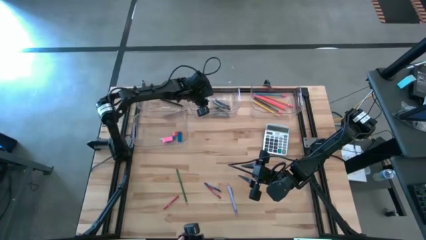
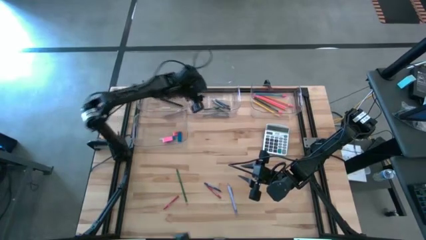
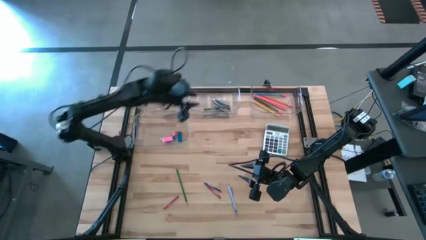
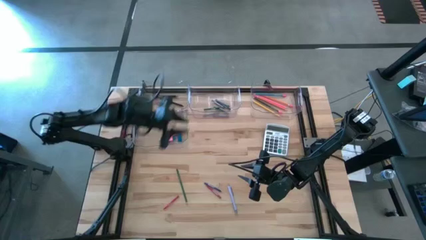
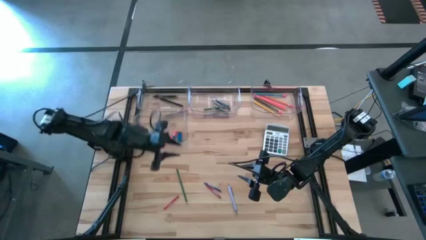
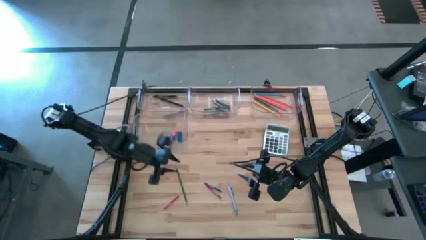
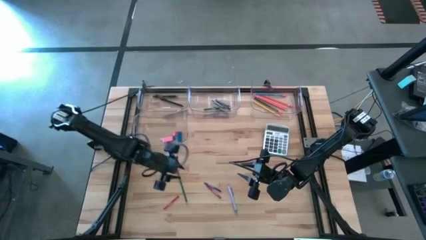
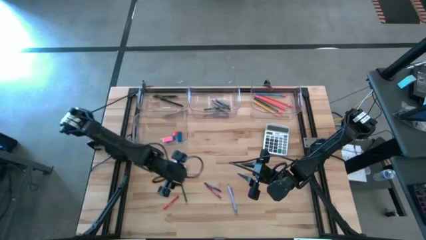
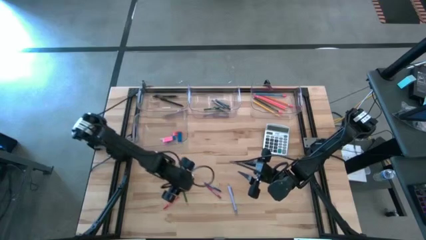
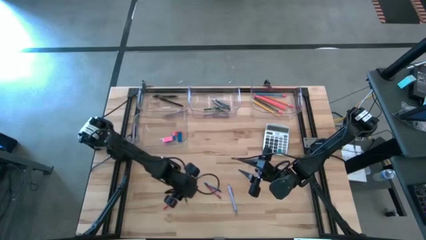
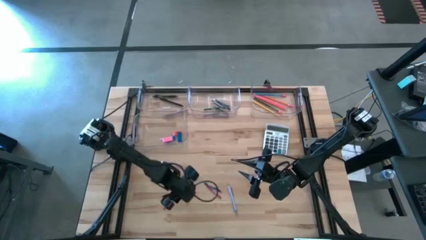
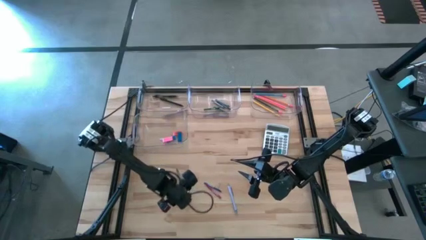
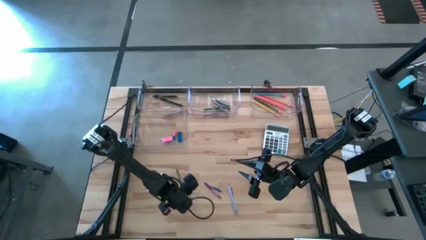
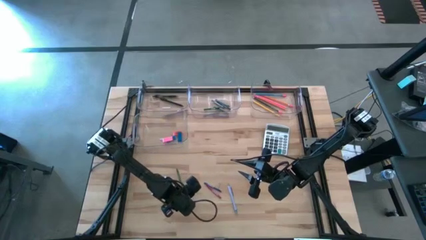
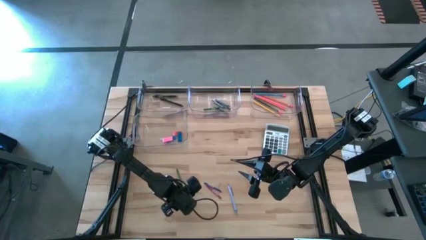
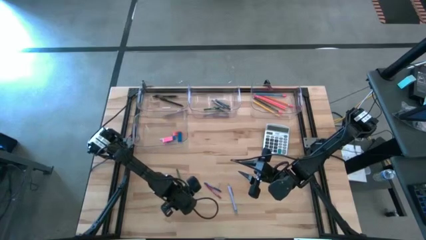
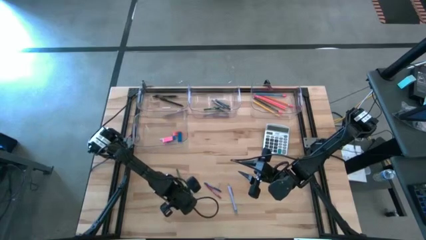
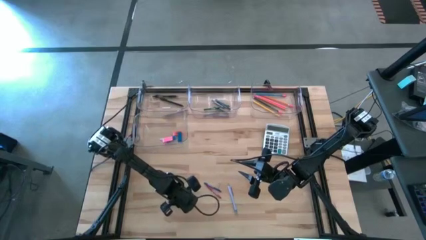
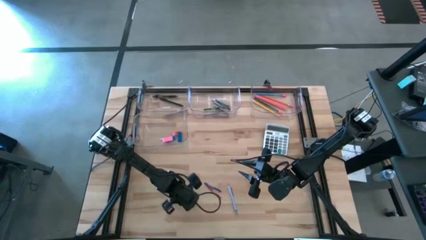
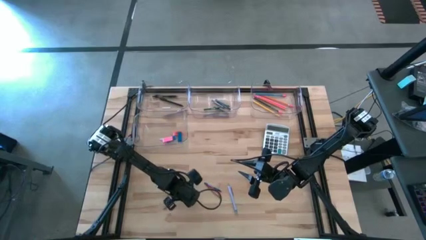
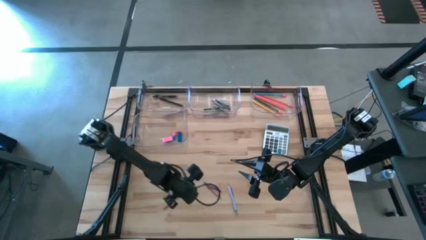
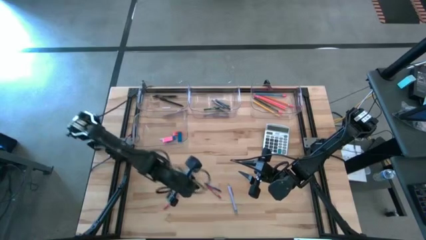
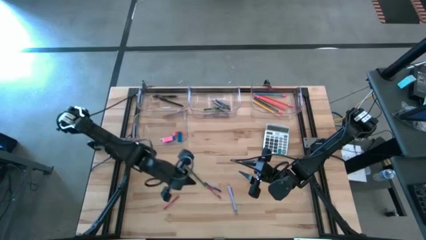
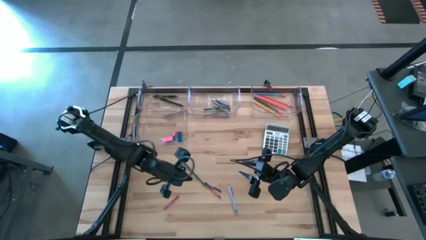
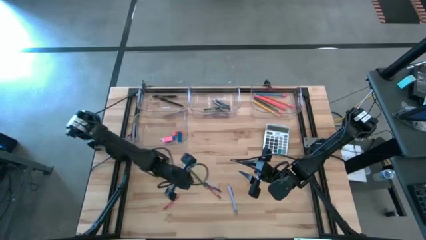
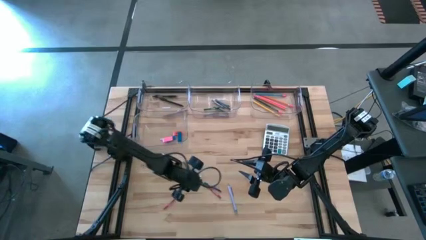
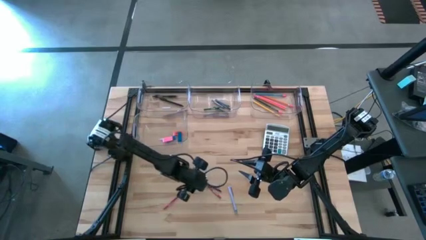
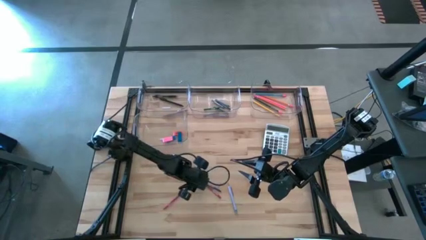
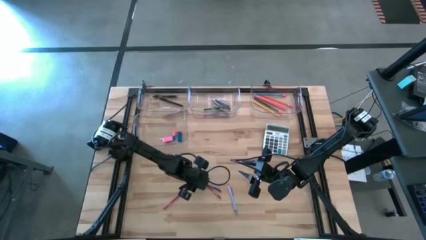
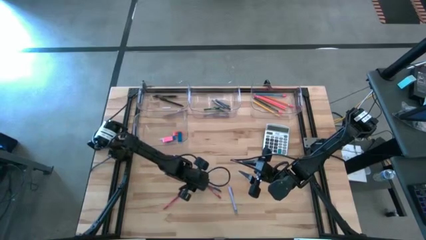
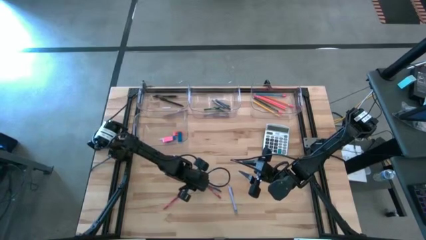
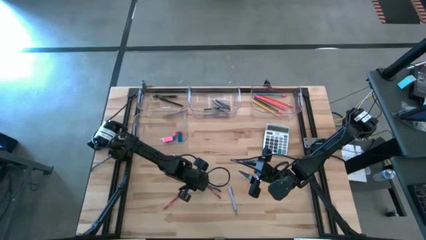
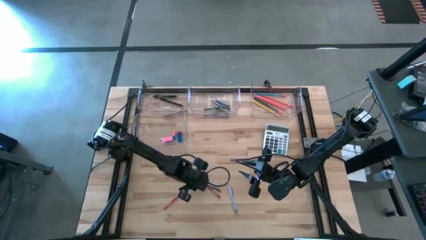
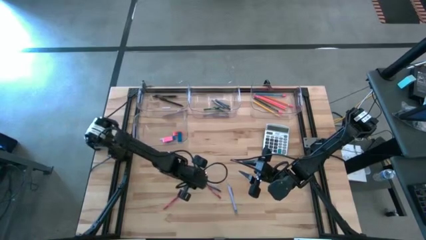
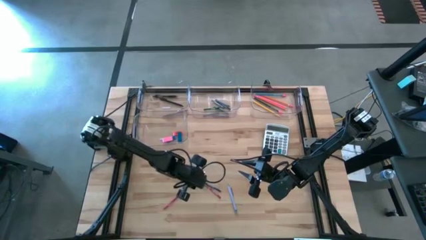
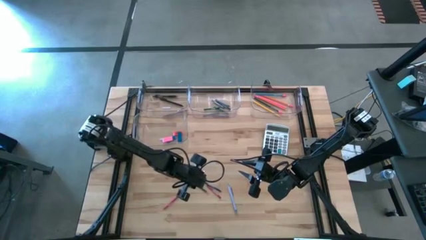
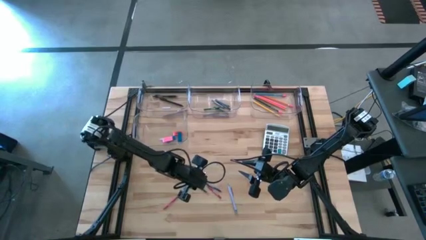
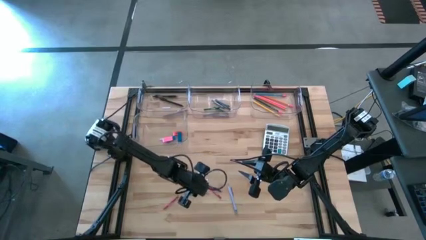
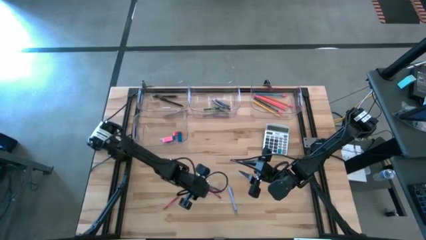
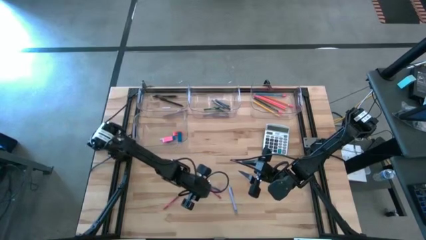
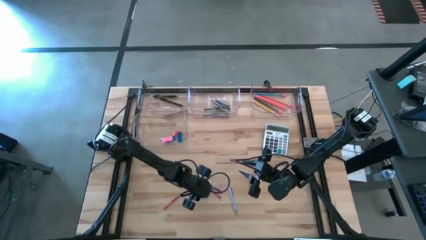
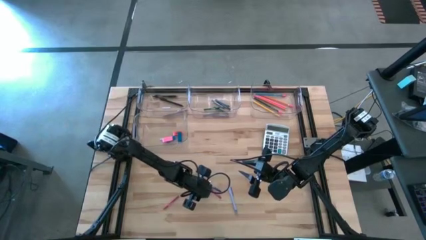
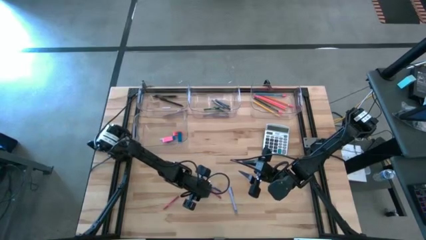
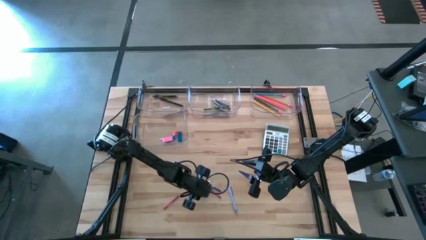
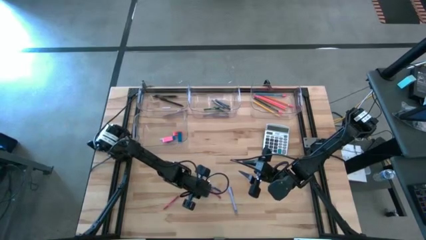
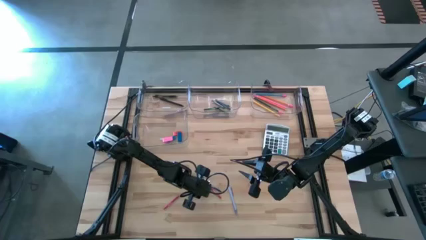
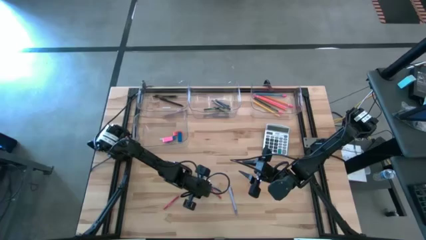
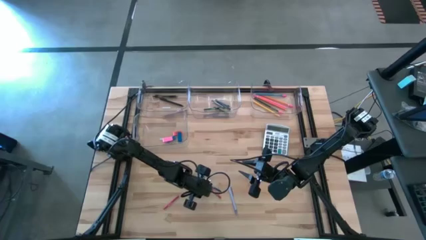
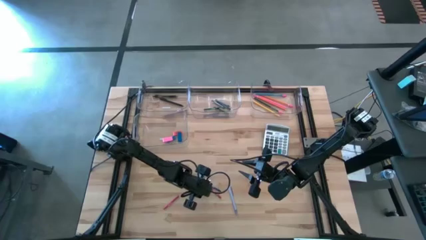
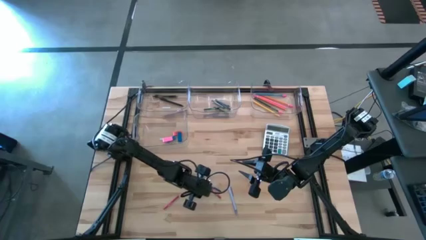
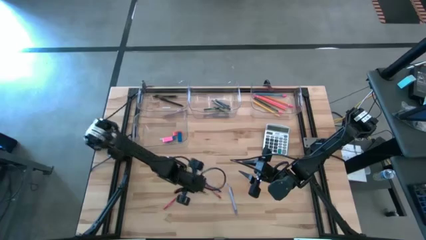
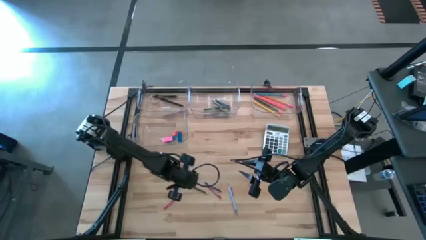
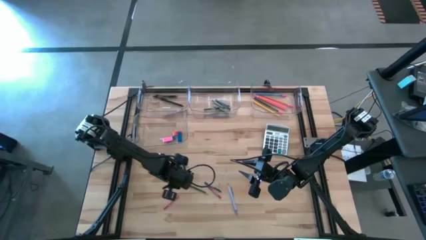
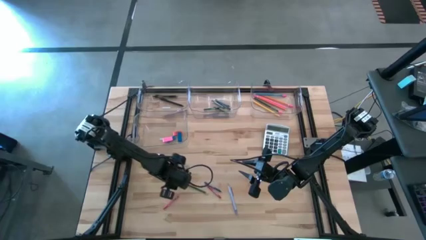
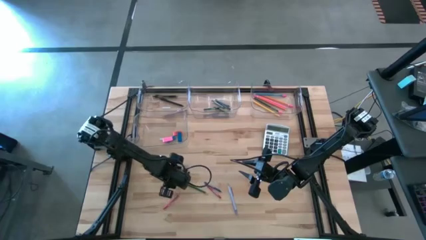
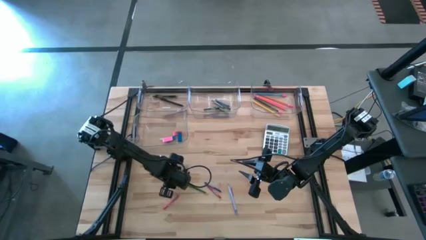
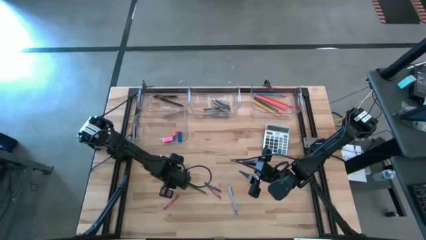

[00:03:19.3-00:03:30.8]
Task: Sort crayons/erasers/pens/pencils in bins
Put the green pencil into the top right transparent bin

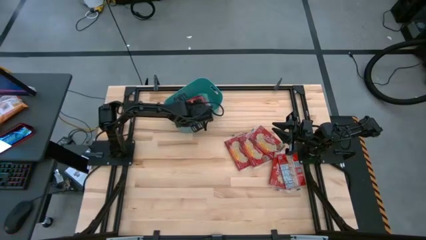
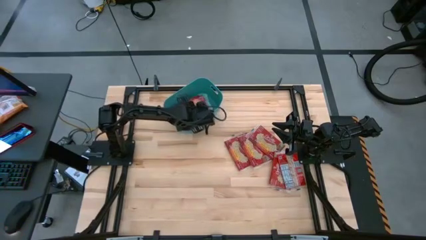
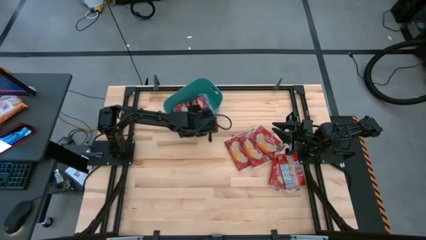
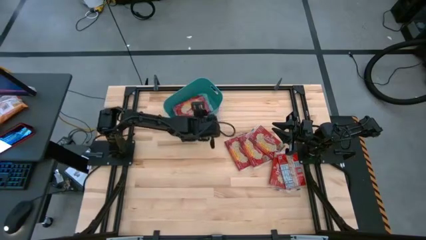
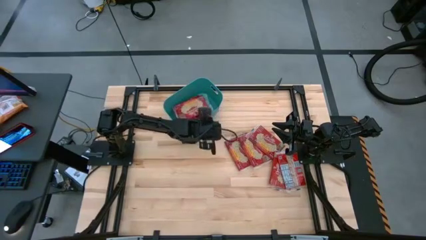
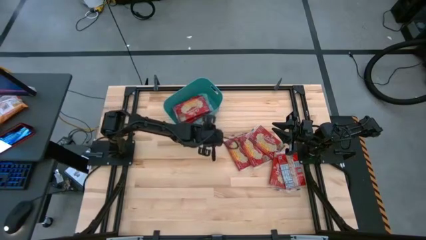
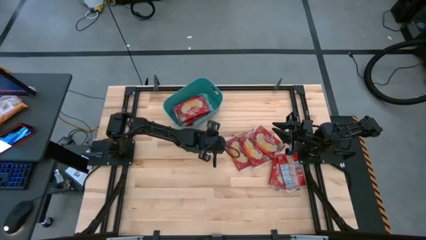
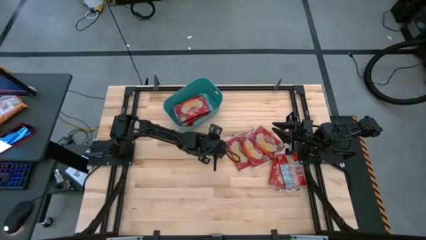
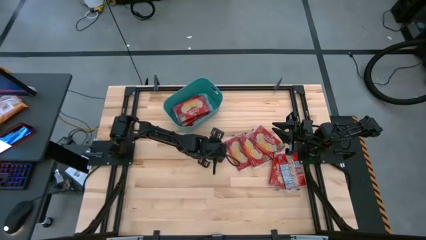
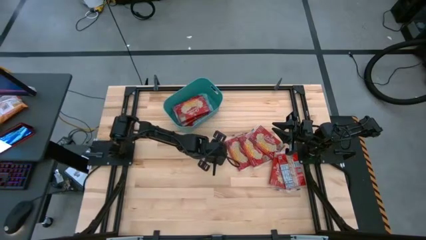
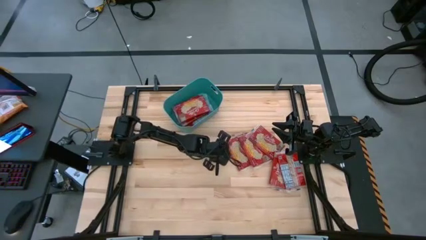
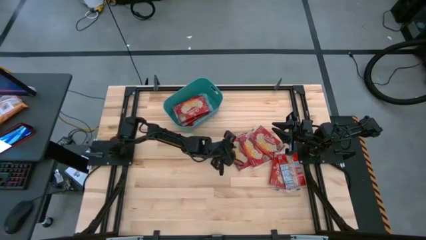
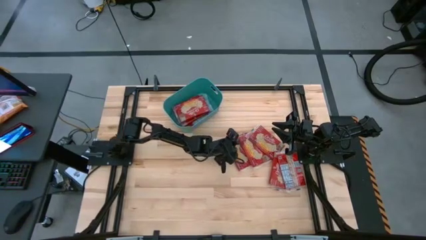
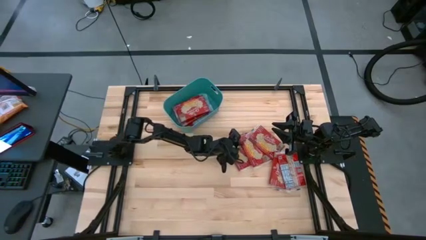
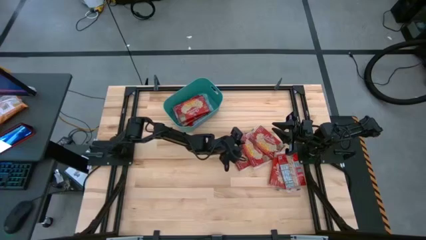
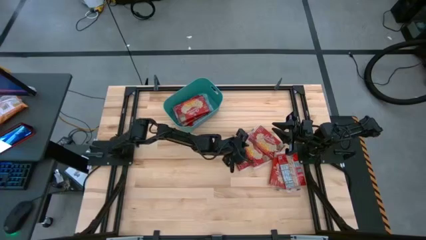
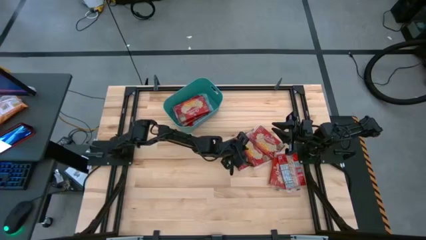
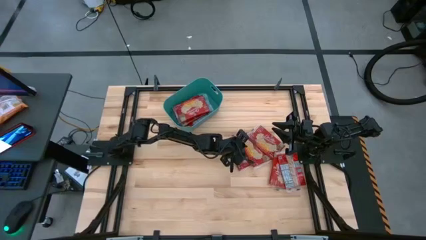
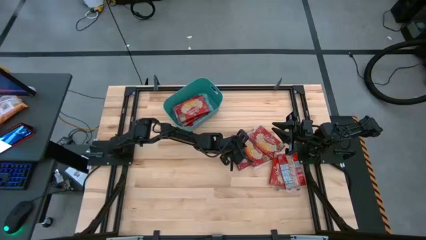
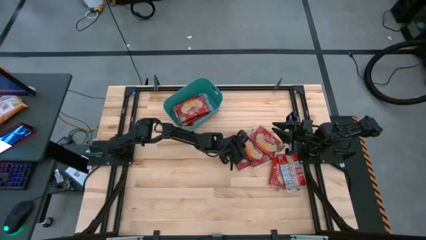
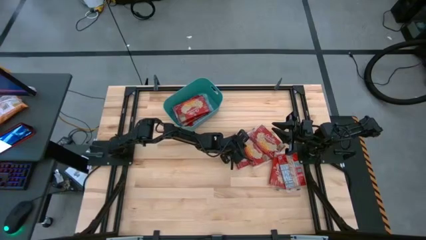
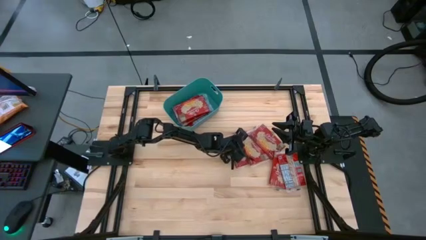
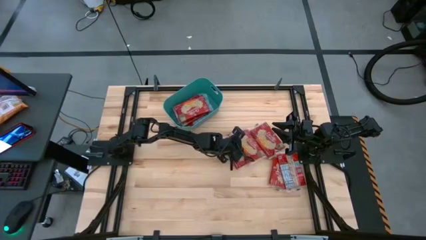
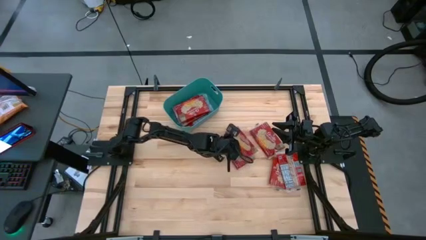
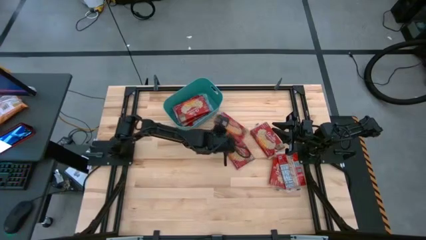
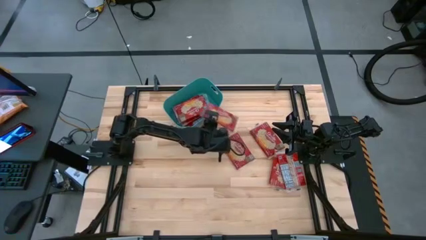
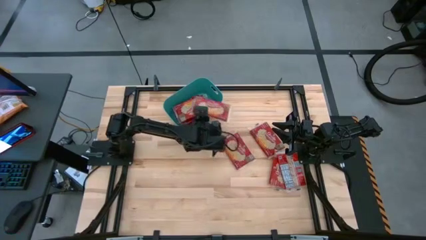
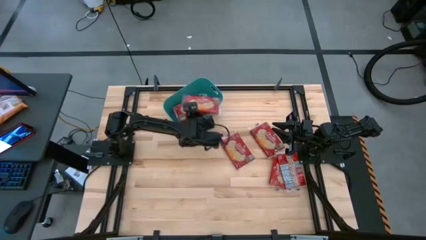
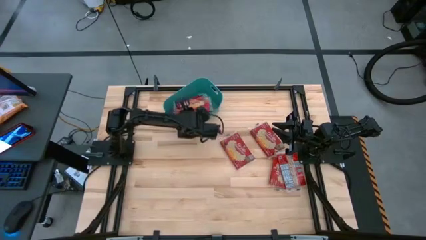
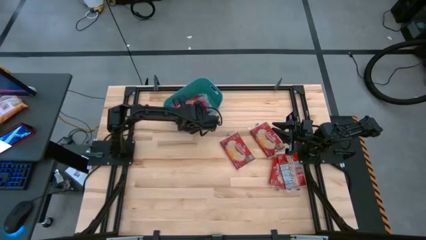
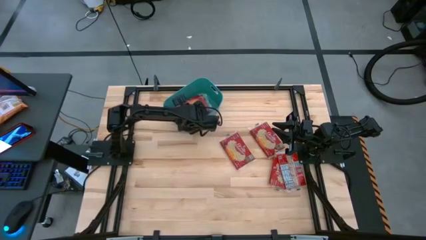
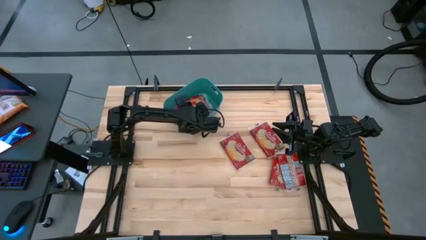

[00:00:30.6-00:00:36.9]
Task: Sort popcorn bags into baskets
Put the red popcorn bag into the green bin
